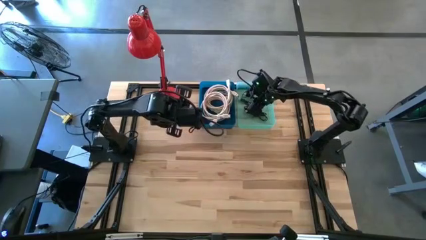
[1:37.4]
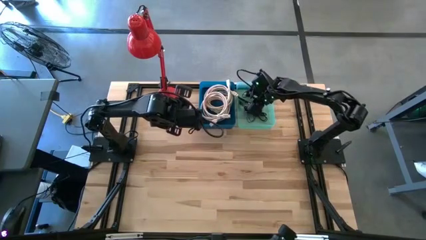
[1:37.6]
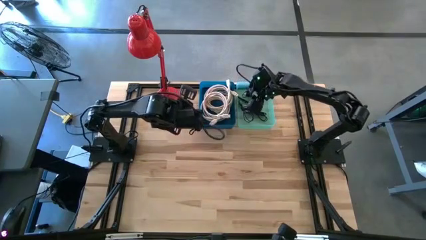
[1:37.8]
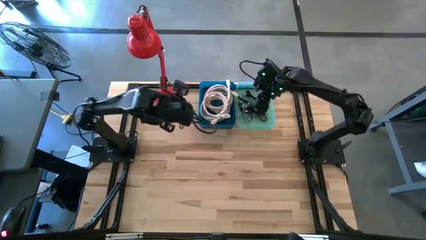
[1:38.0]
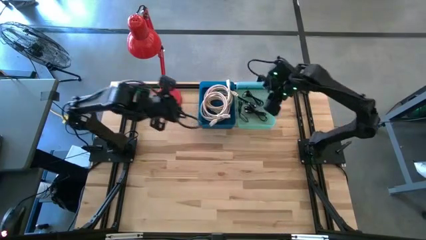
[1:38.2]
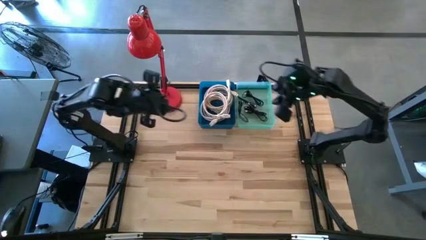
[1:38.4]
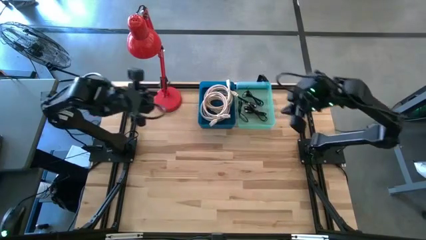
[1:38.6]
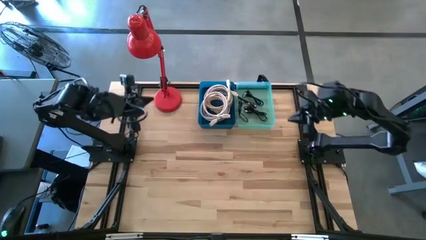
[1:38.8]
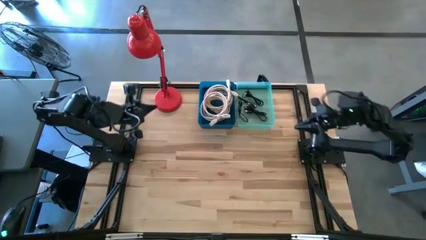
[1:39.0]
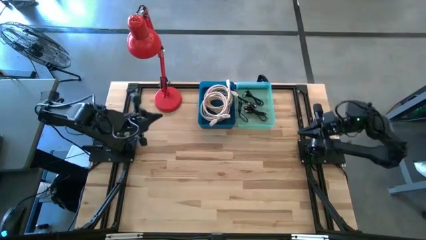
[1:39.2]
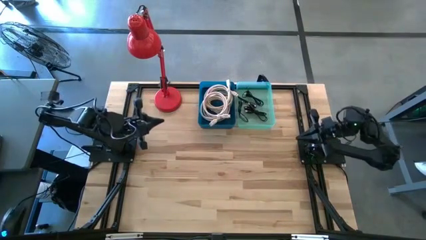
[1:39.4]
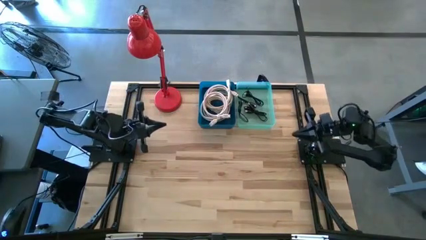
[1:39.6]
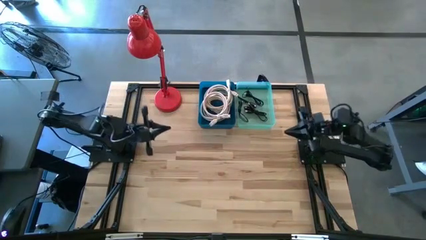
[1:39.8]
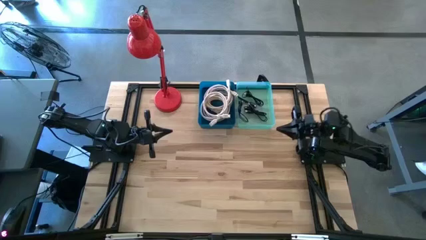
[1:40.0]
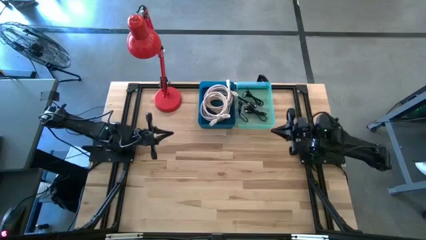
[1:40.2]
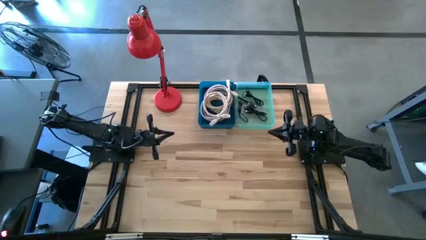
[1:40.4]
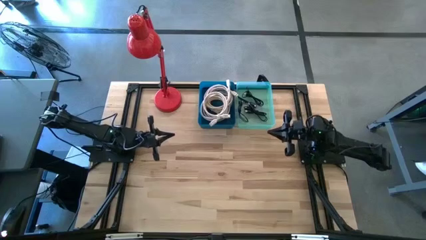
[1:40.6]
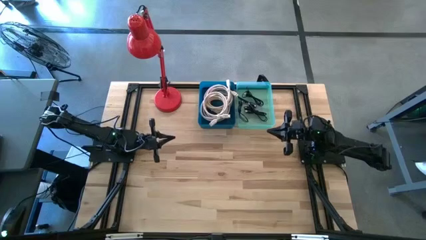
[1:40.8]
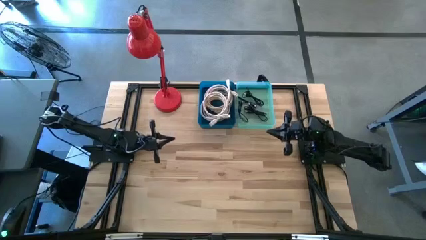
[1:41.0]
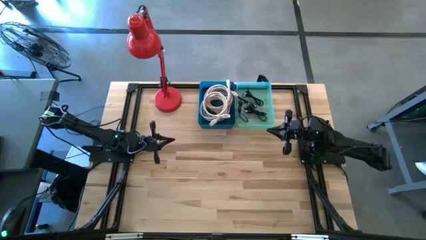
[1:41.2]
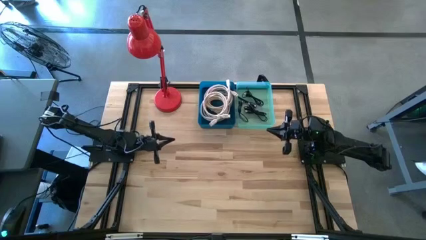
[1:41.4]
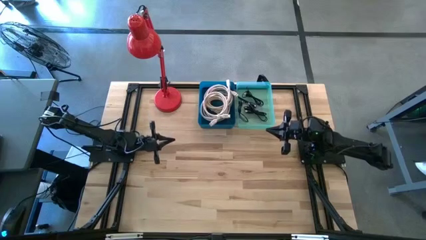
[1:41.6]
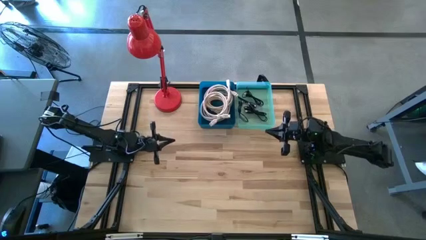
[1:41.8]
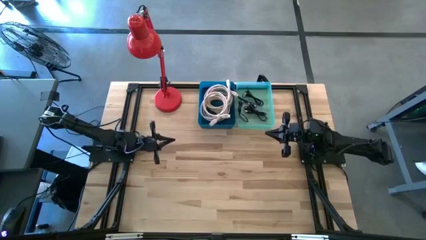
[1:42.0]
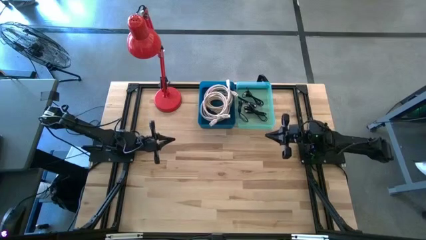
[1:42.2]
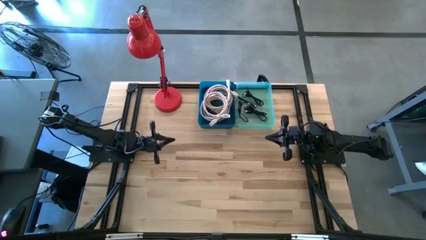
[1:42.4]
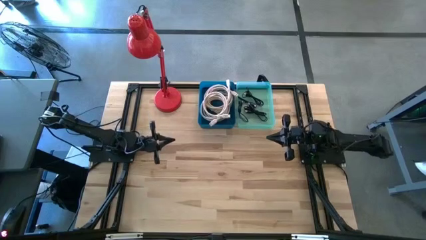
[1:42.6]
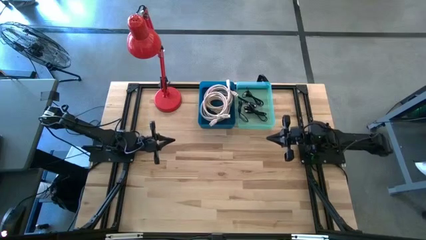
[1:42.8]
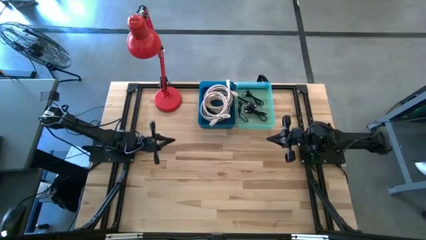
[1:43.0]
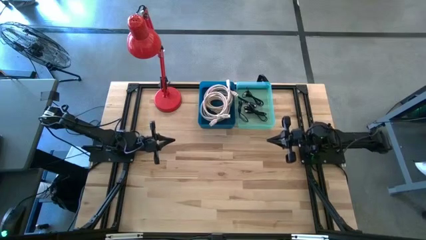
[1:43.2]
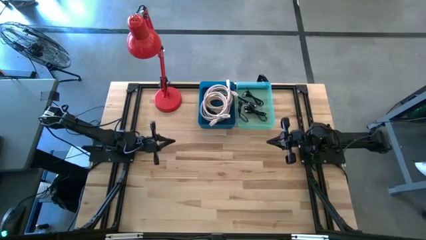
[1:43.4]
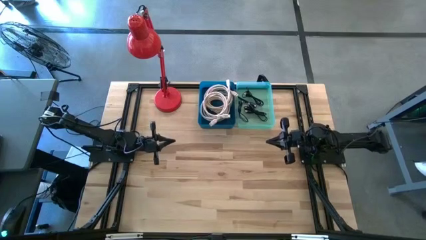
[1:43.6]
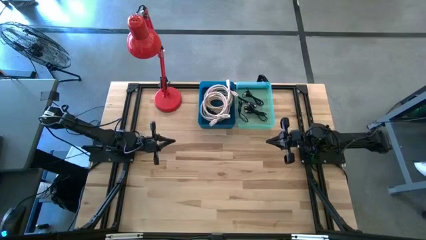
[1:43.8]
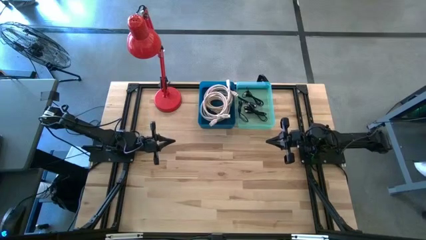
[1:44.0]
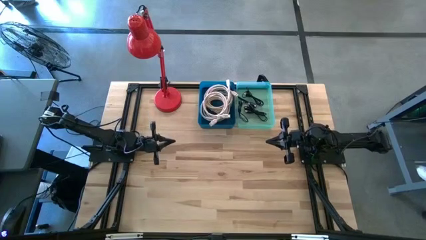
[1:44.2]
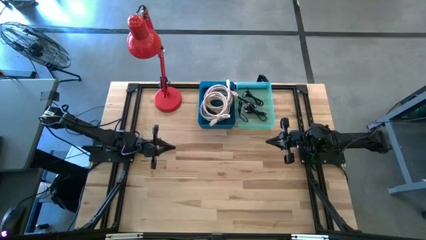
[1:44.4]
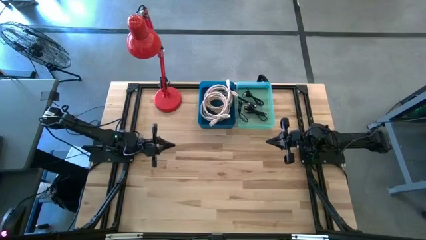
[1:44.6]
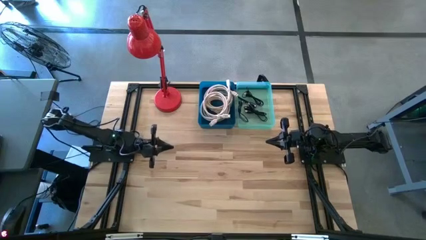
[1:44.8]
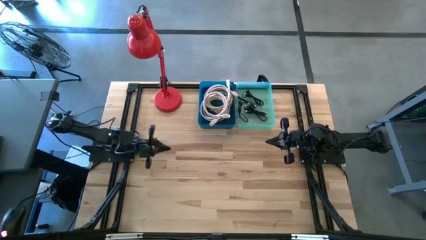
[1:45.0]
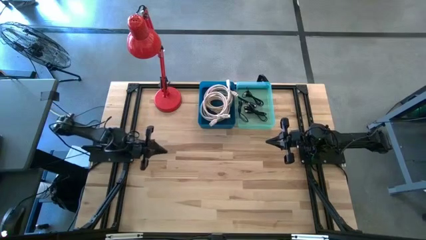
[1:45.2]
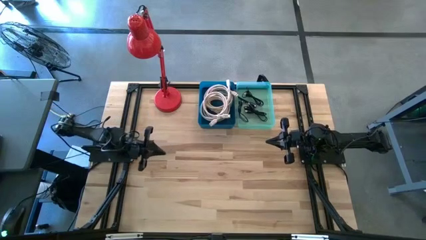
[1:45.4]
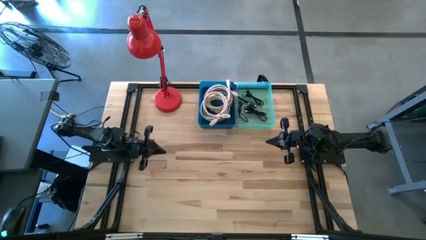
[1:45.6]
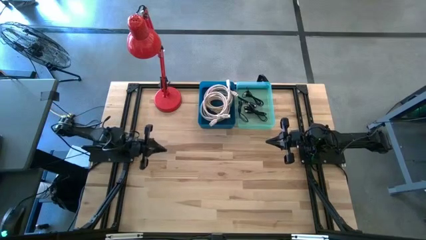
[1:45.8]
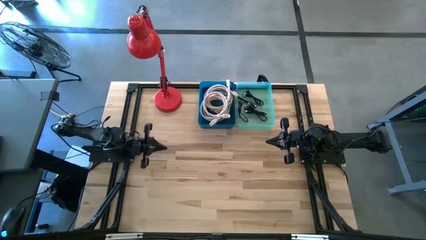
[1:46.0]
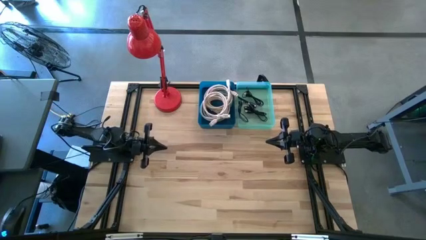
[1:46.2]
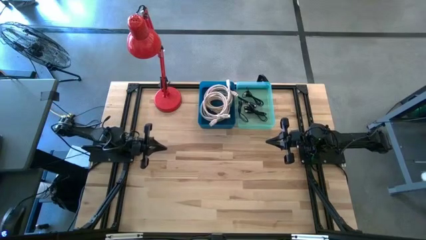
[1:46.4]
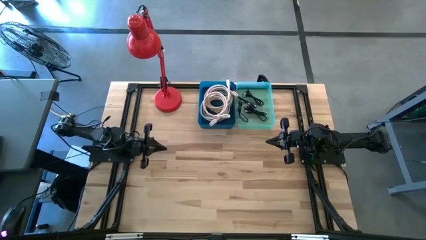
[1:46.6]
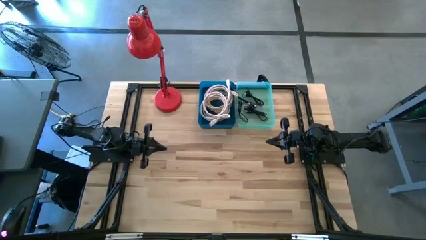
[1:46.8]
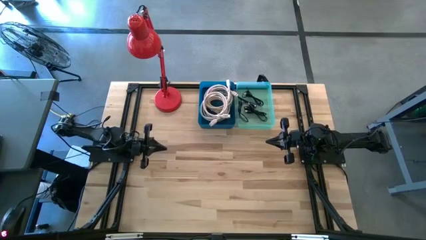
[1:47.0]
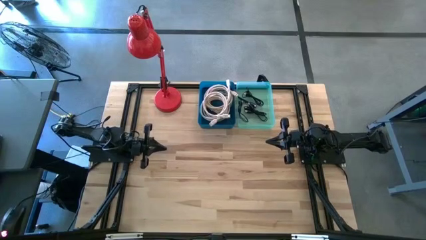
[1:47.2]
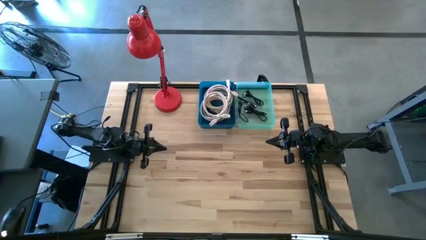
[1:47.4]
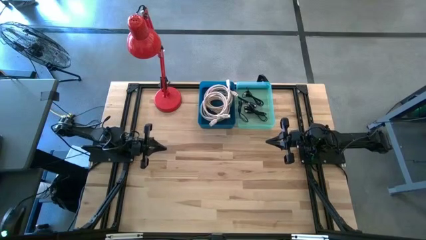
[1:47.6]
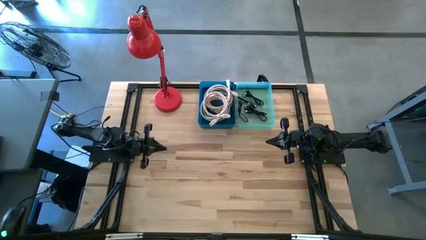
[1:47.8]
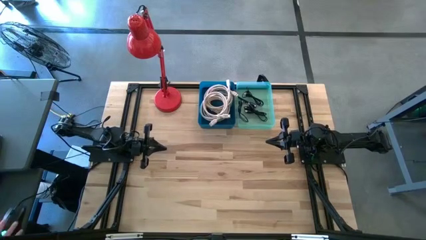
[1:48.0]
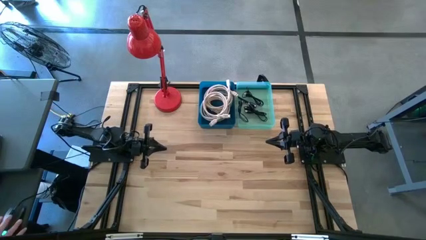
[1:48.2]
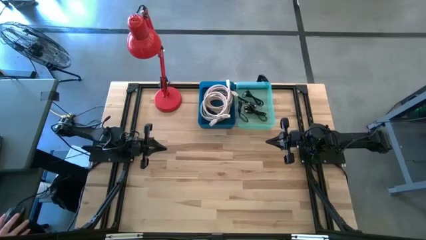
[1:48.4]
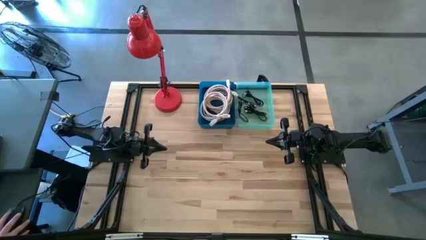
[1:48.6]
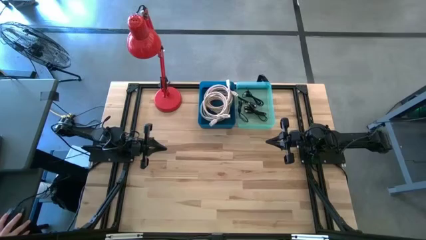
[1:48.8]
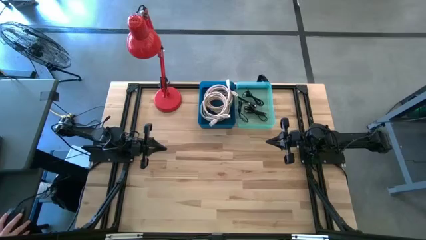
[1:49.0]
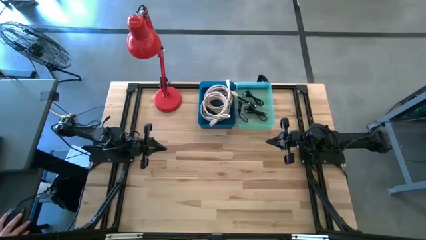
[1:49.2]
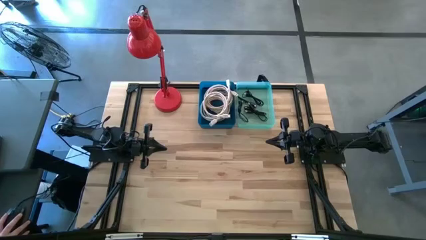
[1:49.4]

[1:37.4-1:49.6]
Task: Pick & Place USB Port
Return to Home Position

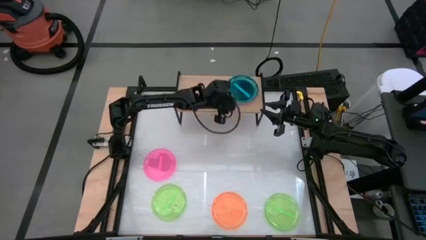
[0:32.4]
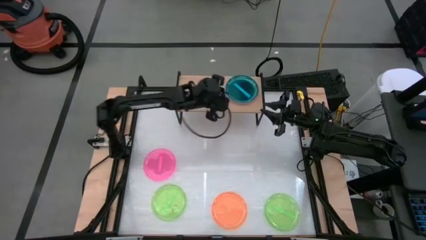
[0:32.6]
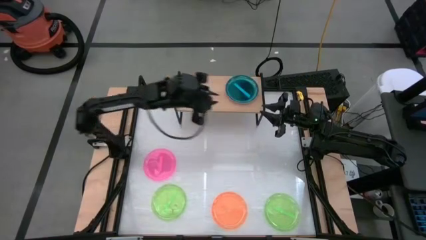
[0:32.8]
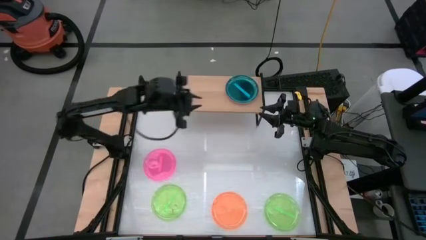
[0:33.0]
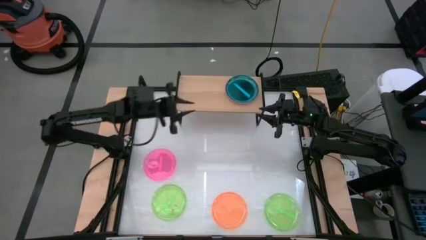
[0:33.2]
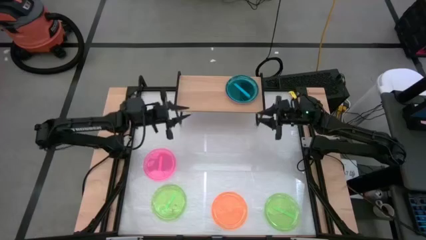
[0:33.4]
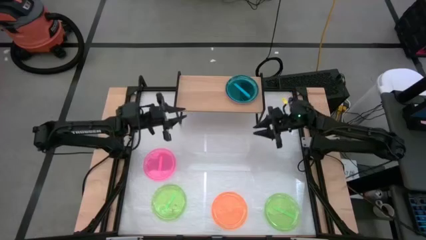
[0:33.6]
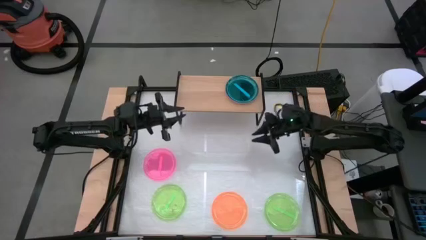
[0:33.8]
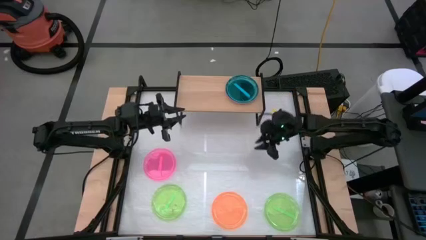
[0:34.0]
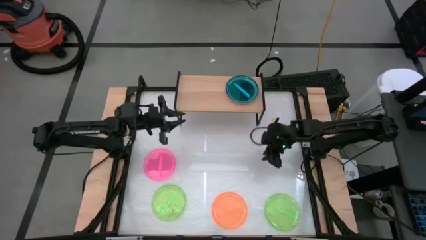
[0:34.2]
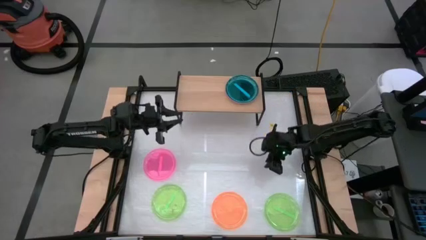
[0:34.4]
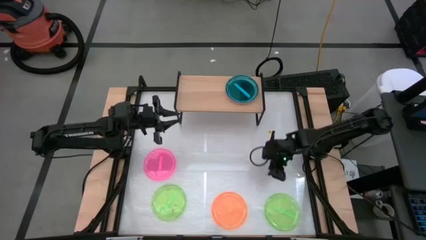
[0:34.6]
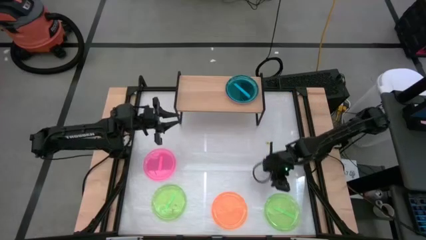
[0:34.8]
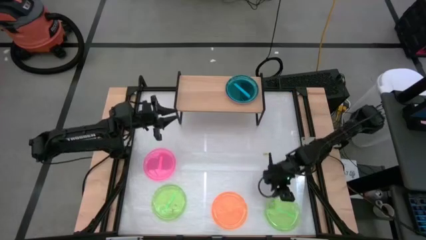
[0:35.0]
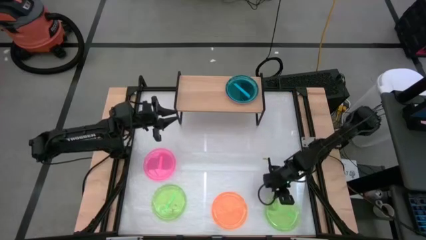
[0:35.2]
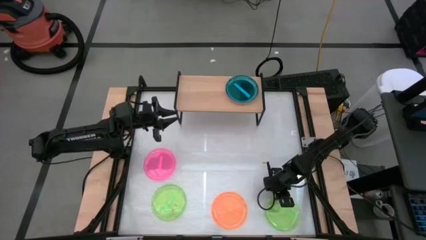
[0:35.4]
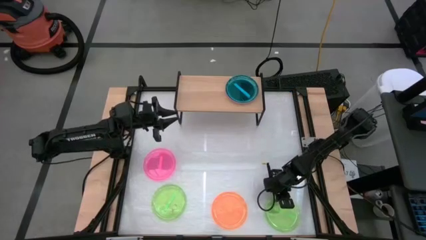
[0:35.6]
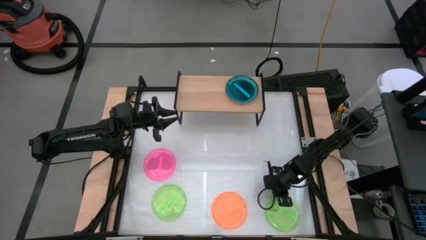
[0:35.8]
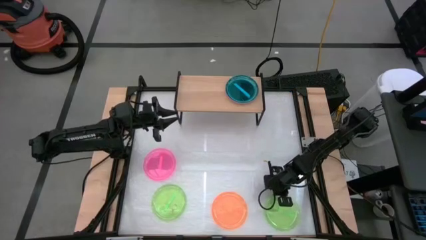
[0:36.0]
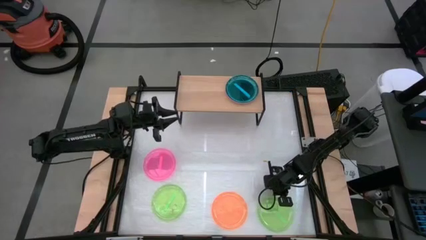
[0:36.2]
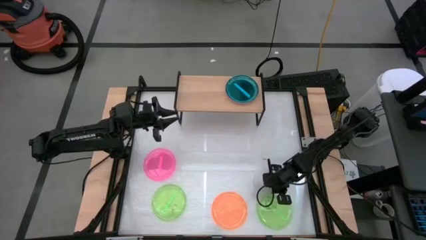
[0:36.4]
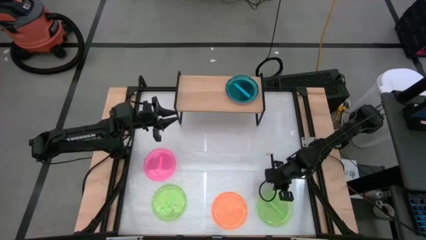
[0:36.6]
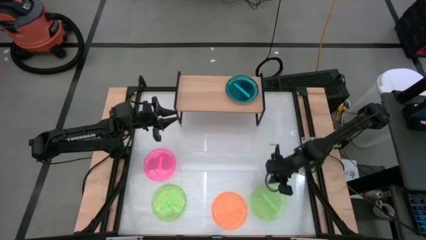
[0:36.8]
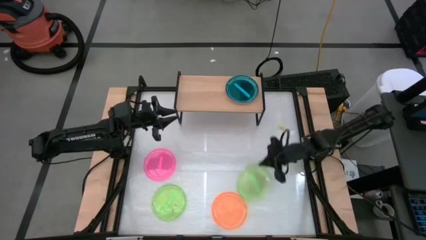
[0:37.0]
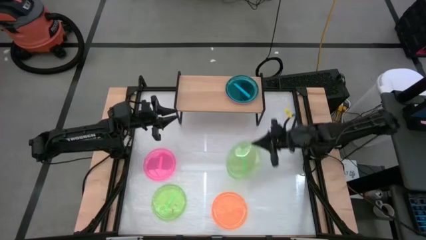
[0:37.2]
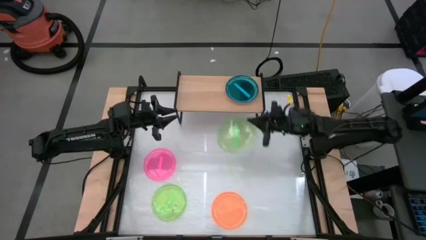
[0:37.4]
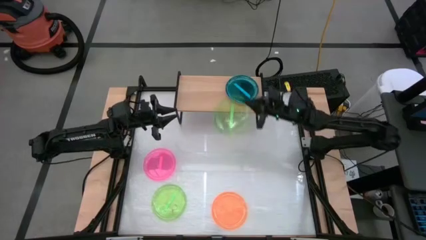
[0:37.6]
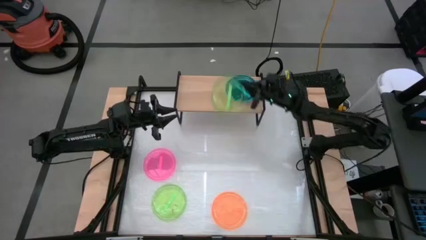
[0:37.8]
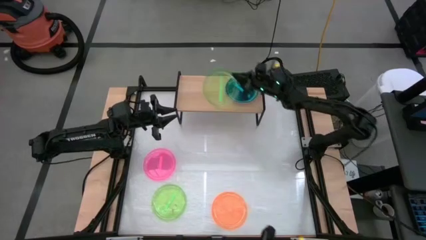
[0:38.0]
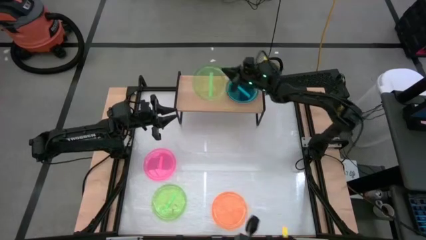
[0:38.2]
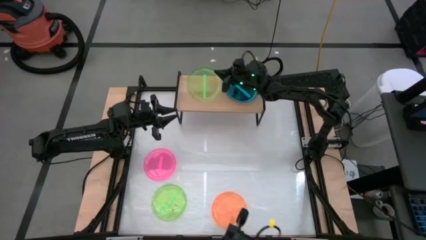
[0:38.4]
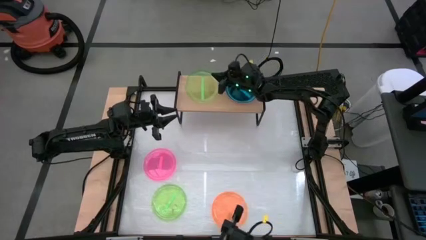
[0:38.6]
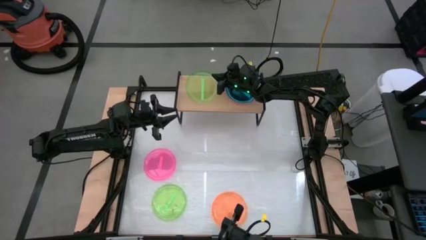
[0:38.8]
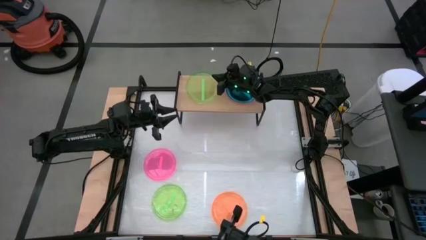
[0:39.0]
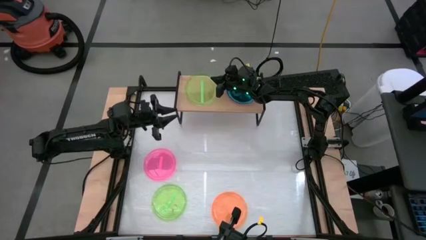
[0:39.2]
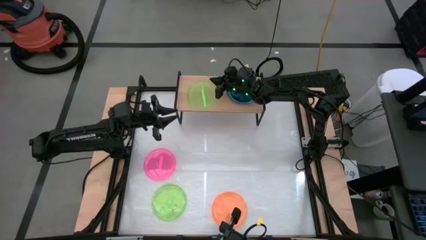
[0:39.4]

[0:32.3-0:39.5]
Task: Place and stack plates onto a shelf
Put the right green plate on the shelf
